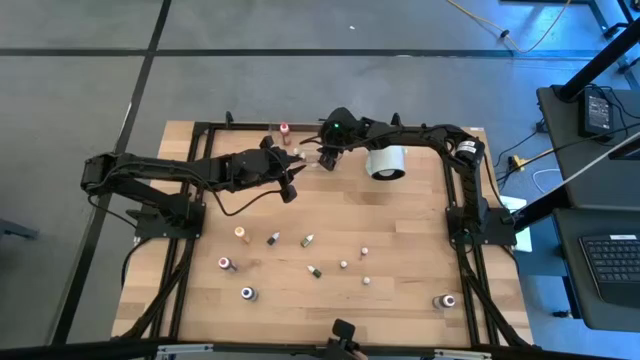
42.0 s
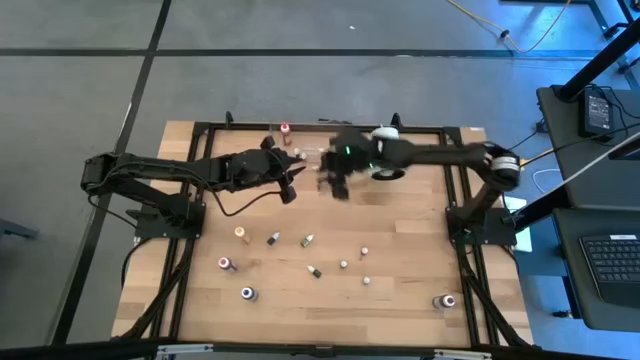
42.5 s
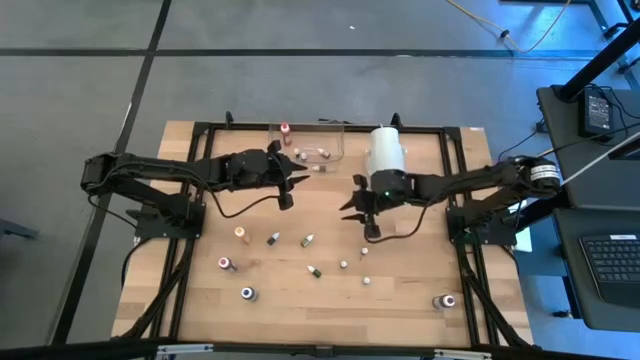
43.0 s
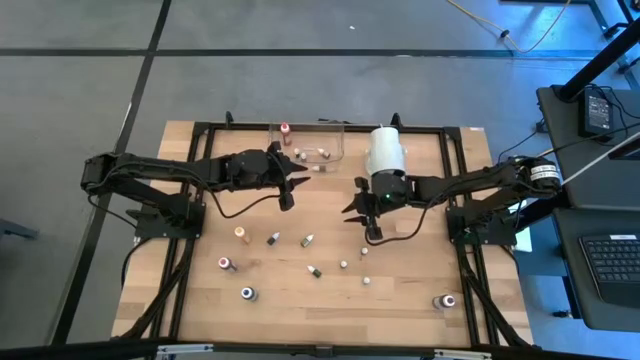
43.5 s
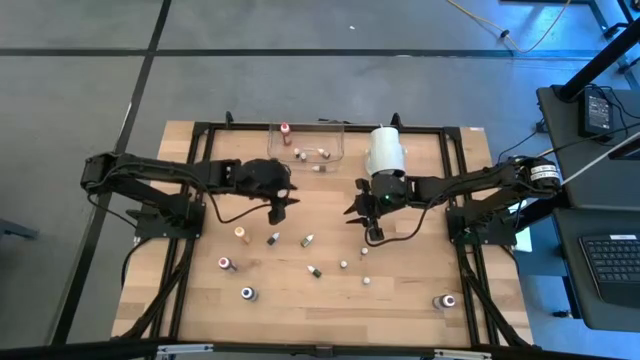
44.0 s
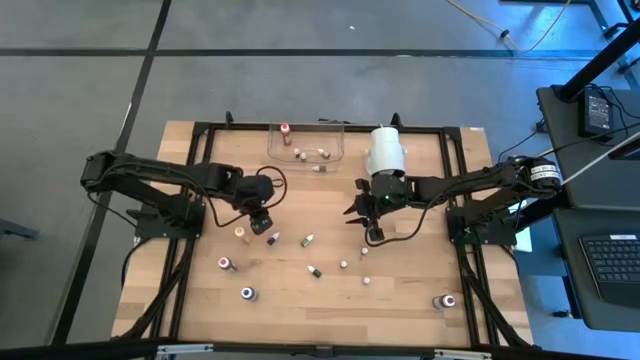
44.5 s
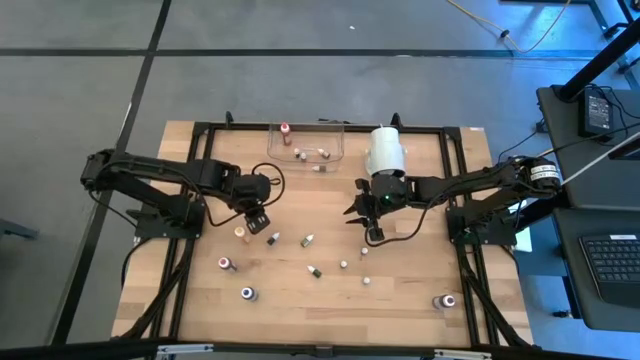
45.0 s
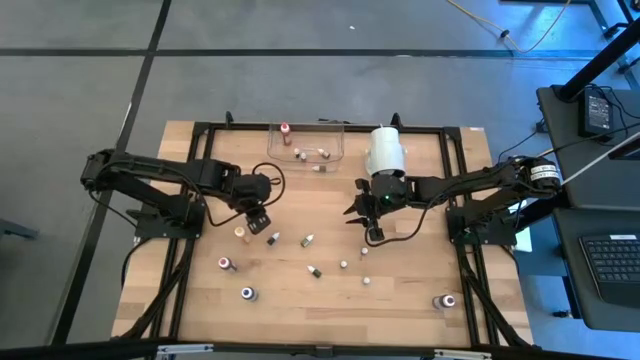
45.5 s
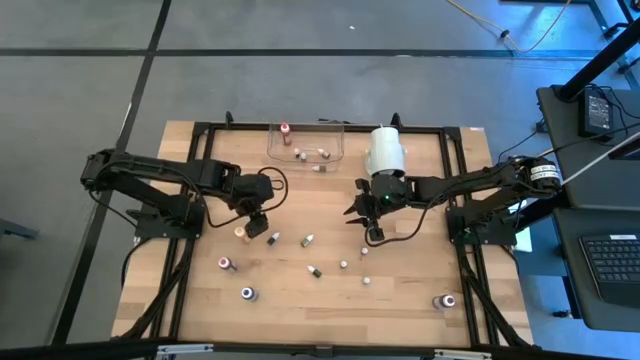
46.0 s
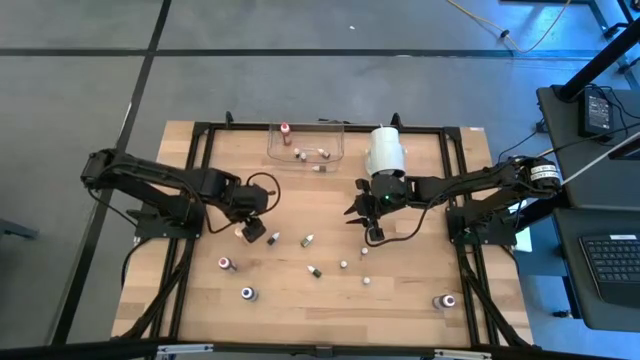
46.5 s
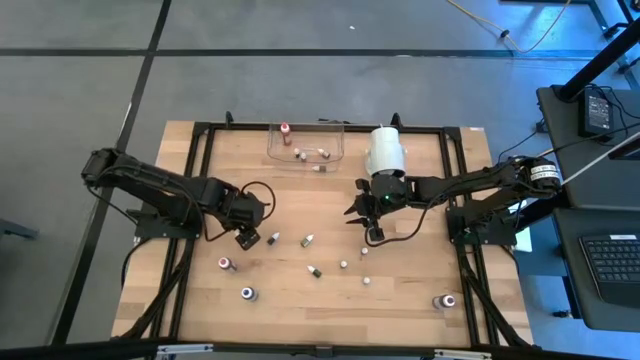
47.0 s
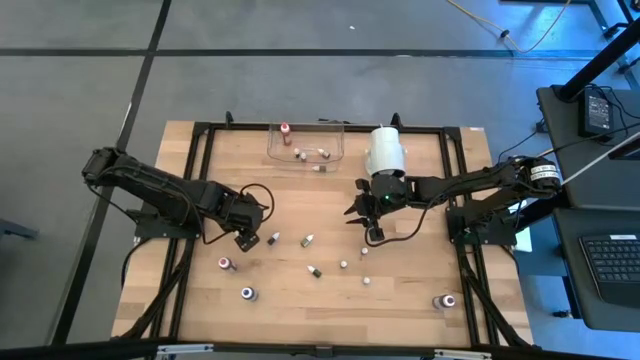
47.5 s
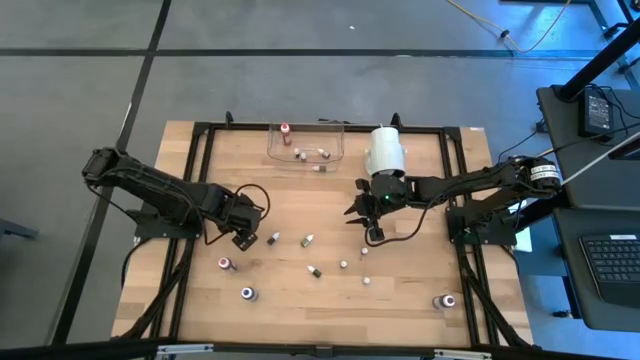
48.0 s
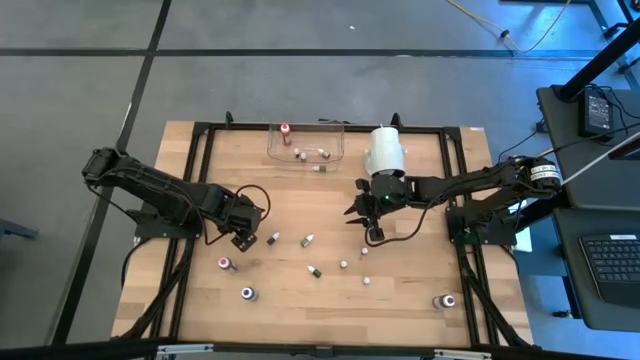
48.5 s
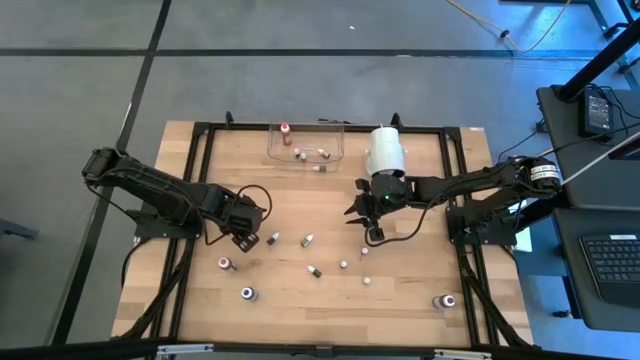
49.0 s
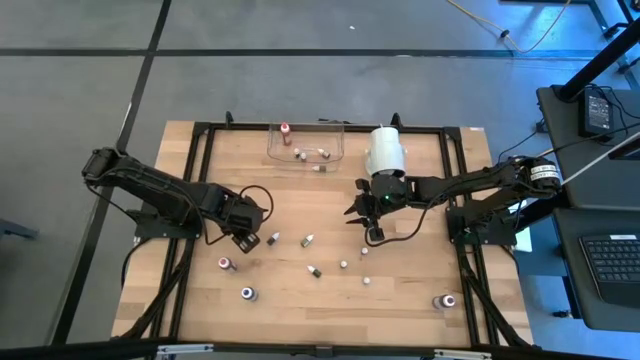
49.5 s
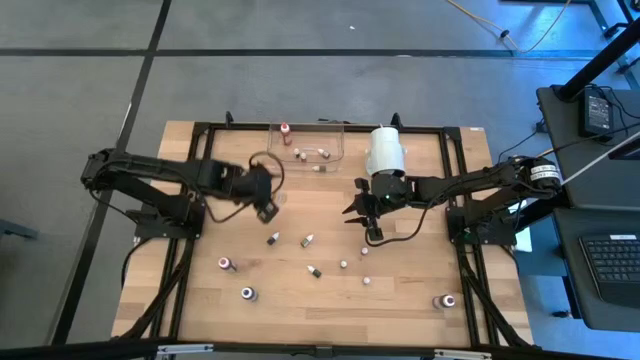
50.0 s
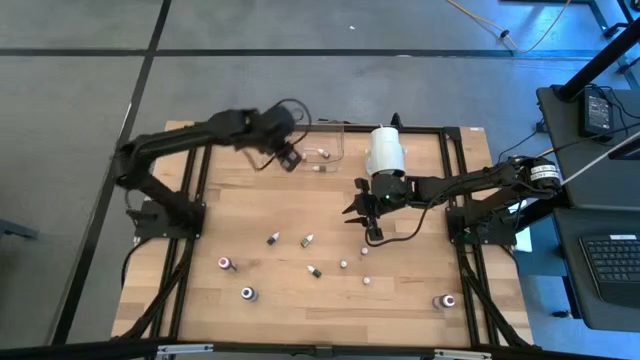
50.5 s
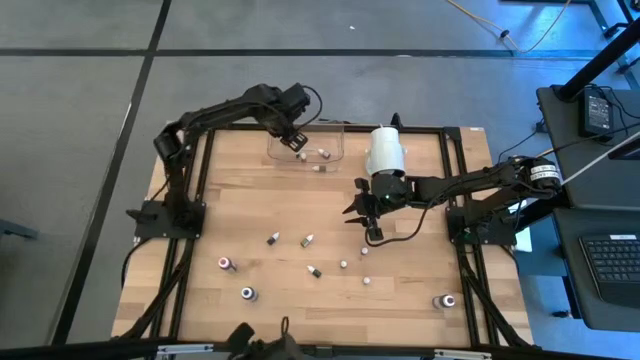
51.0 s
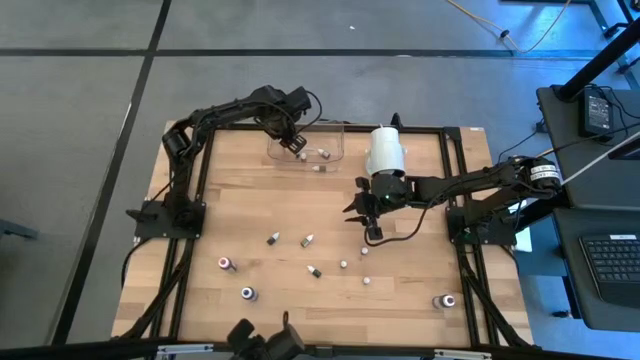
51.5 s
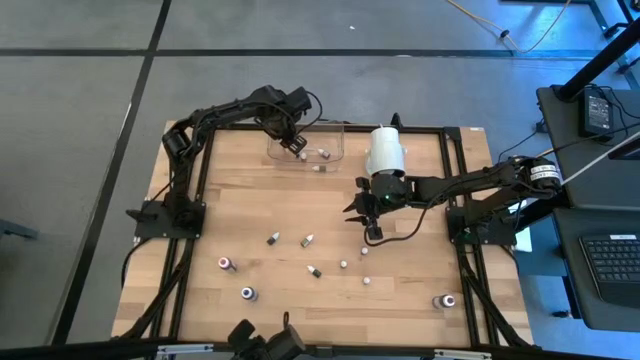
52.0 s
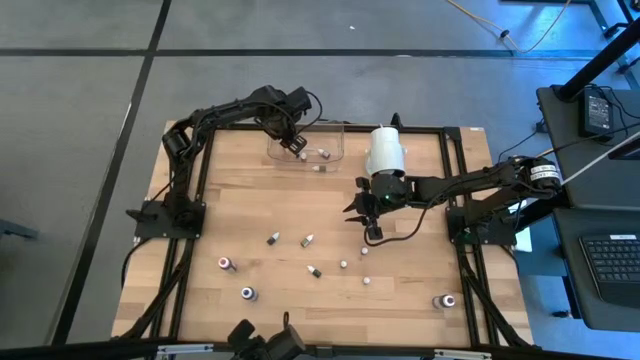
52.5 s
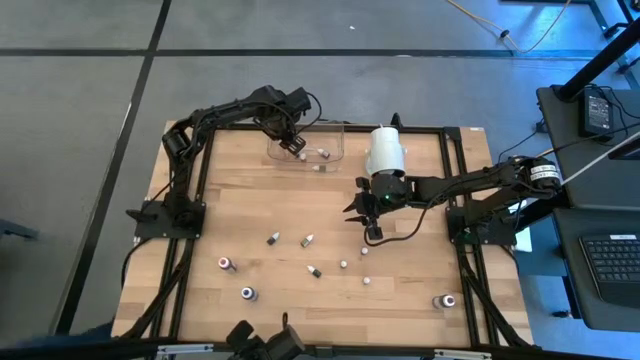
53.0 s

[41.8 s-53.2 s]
Task: Pick & Place food coloring
Put the yellow food coloring bottle into the transparent bin

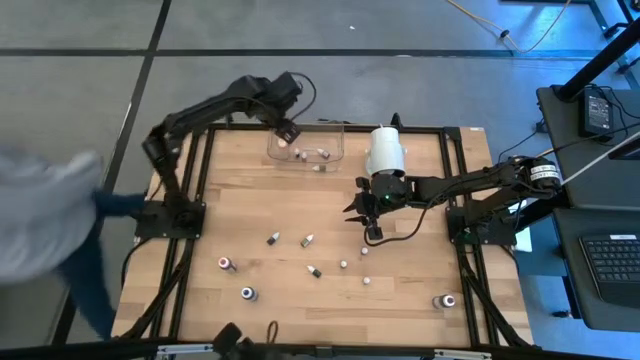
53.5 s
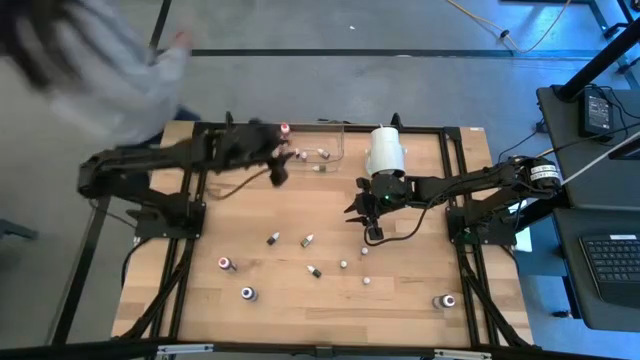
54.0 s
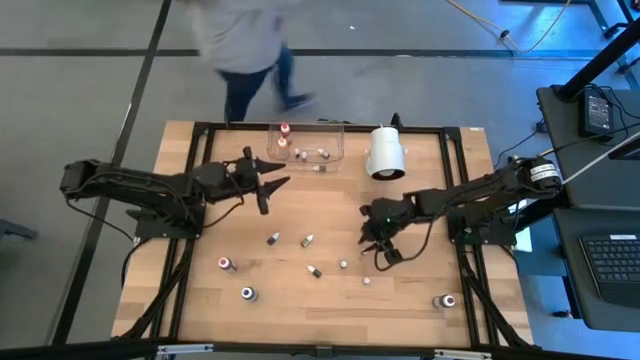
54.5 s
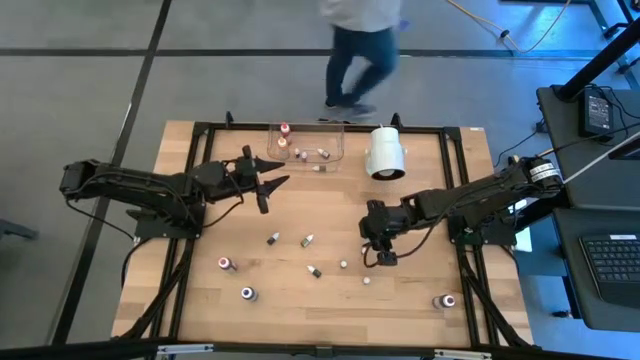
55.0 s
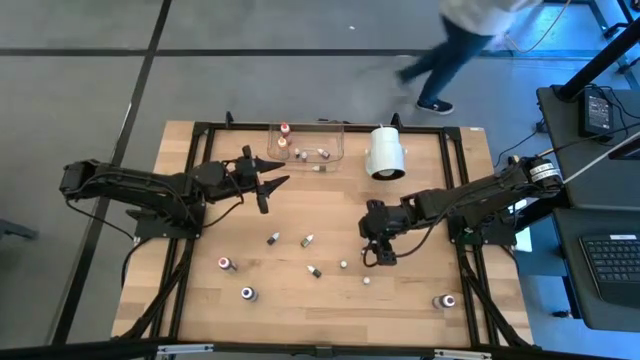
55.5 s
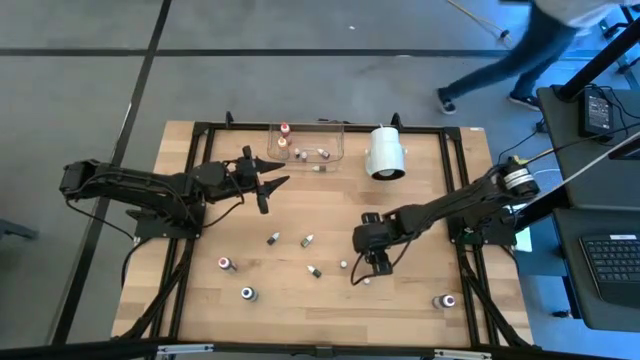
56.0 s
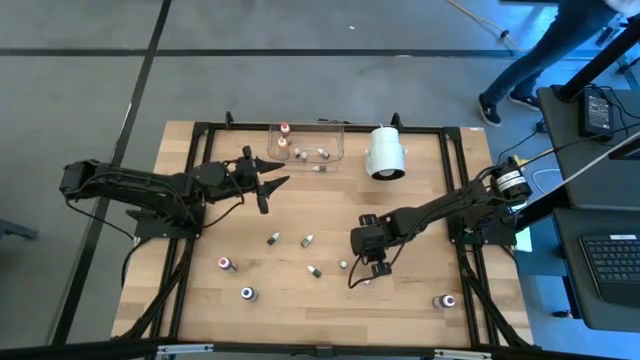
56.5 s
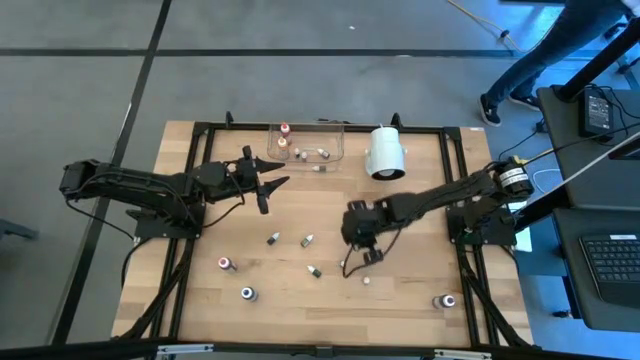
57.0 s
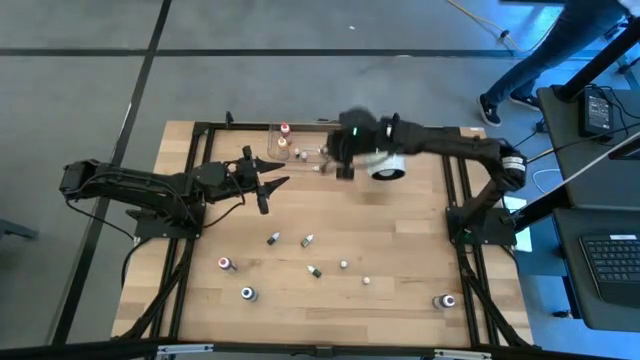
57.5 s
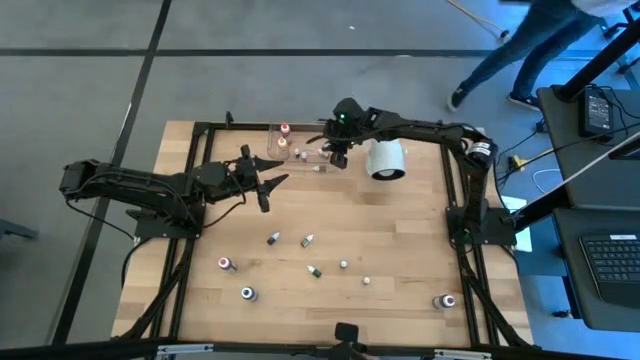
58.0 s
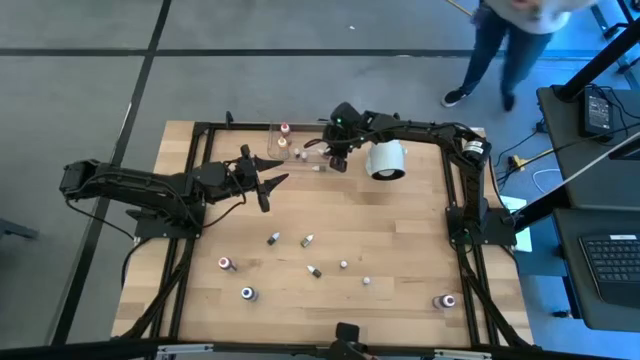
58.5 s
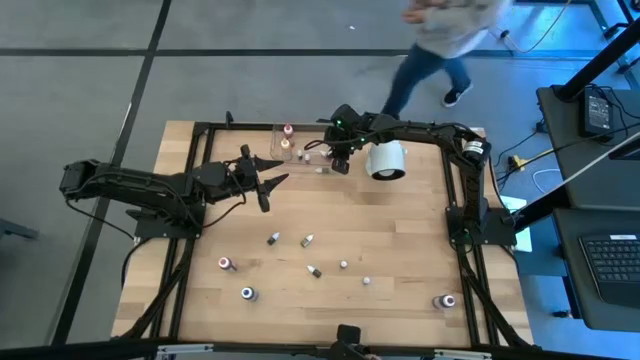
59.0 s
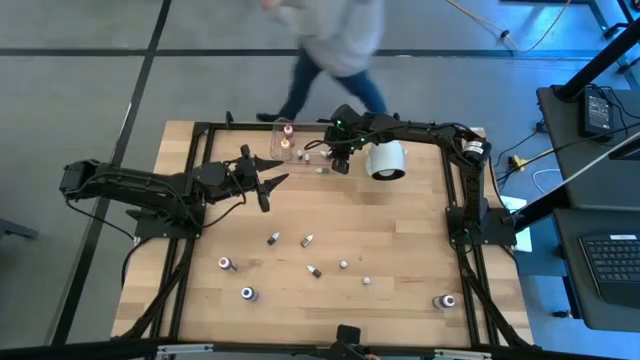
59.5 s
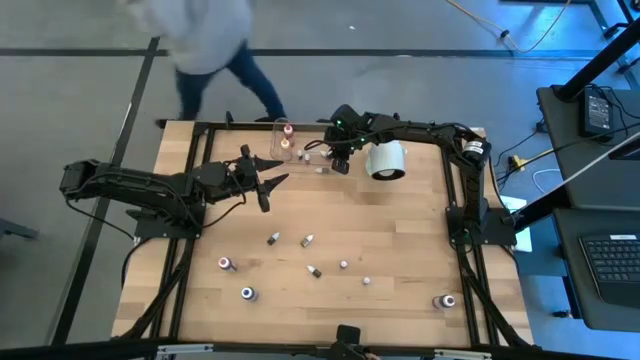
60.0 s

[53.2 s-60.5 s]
Put the red food coloring bottle into the transparent bin

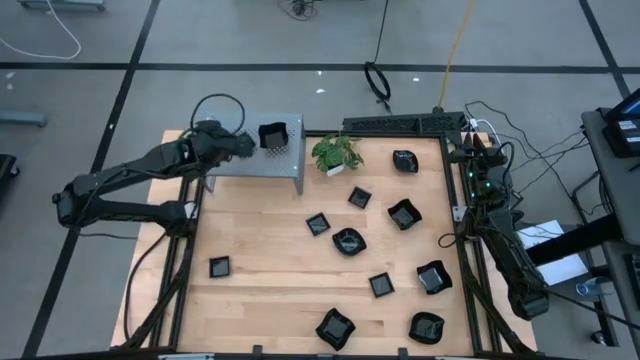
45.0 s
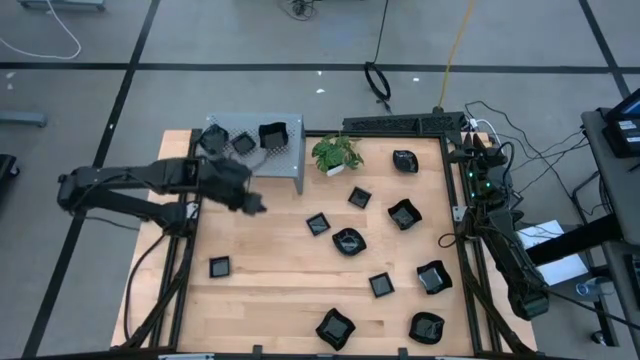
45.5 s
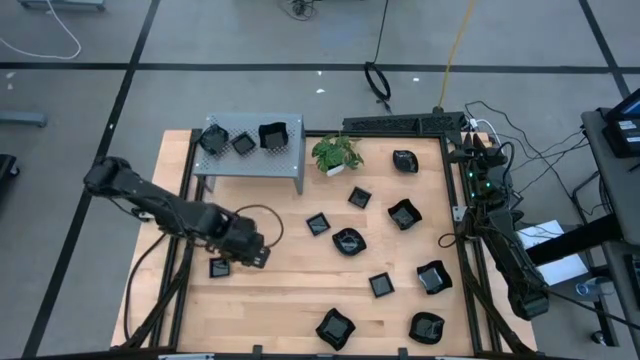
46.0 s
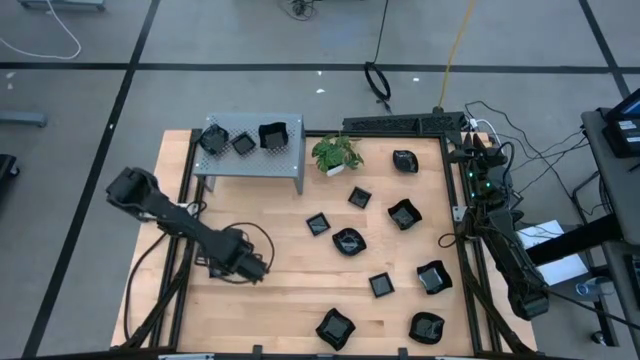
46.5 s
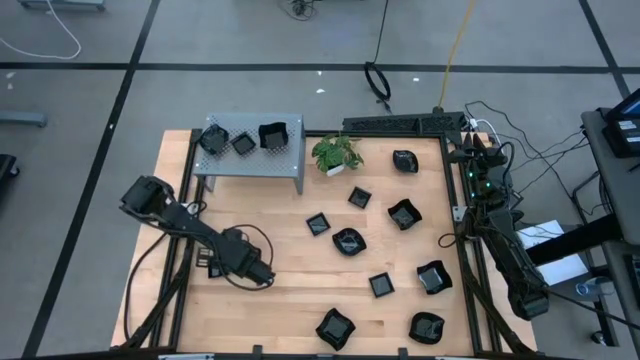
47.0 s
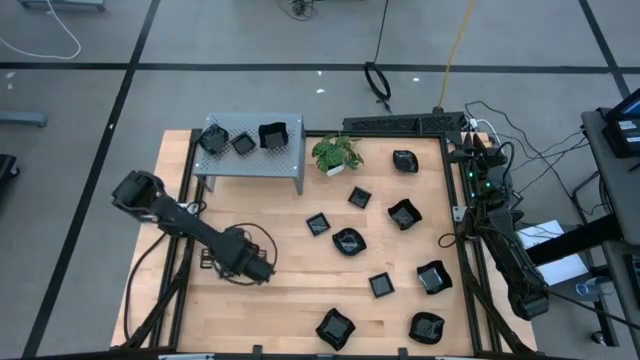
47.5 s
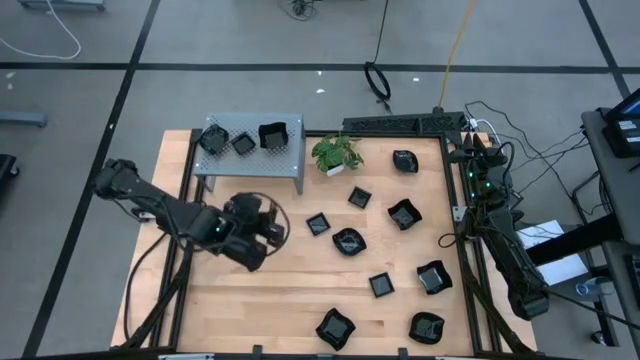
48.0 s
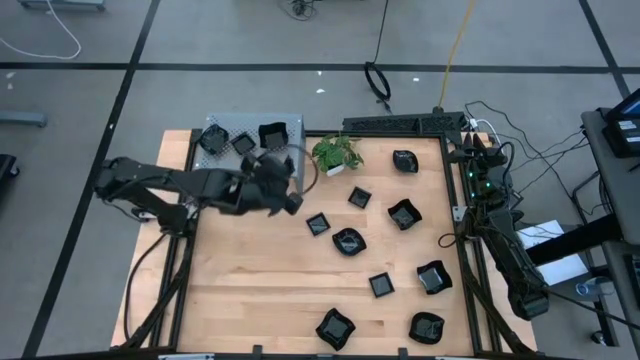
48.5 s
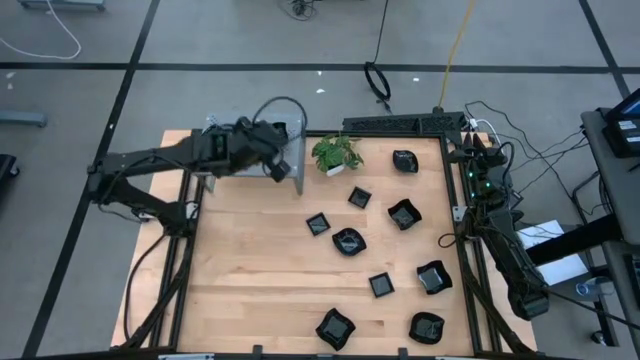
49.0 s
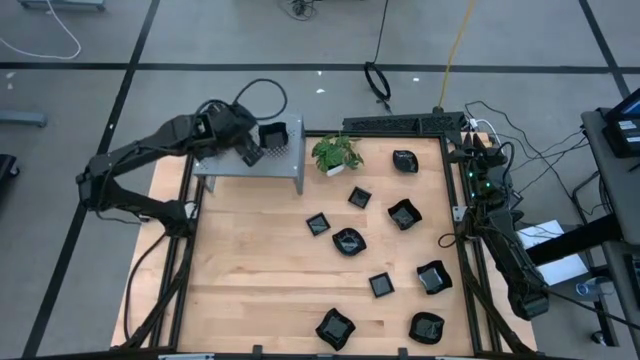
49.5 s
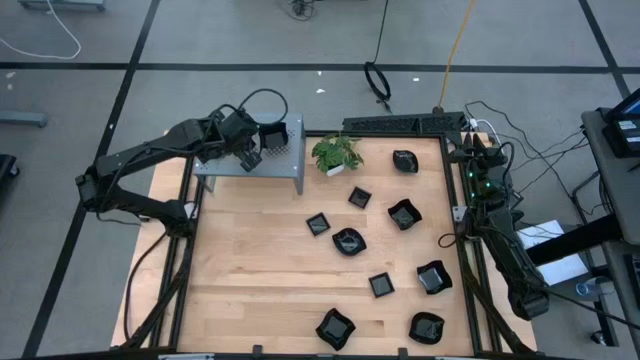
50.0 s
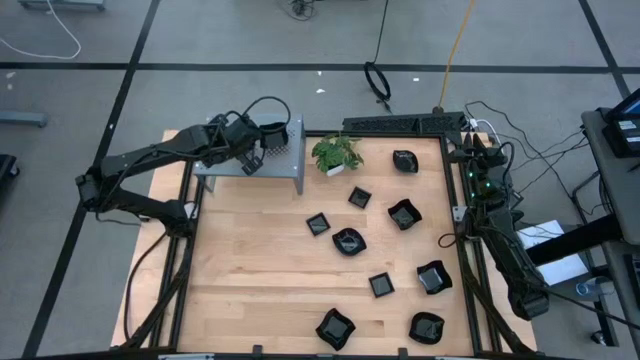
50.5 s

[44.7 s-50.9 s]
Task: Pick & Place Mini shaped plates
Stack the black square plate on top of the other black square plates on the shelf
